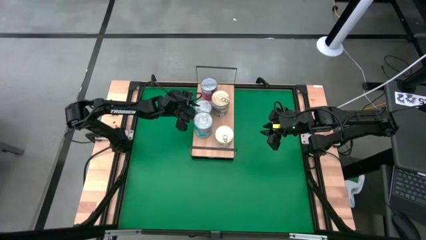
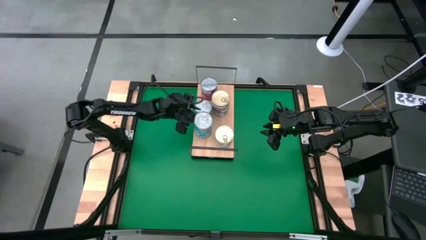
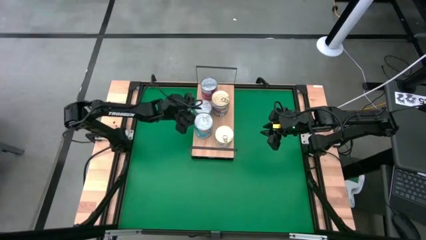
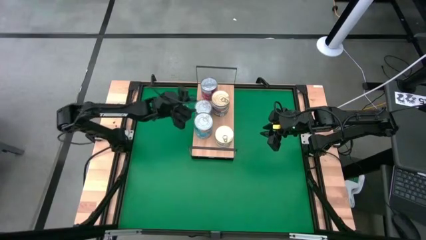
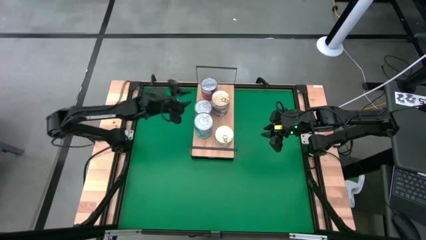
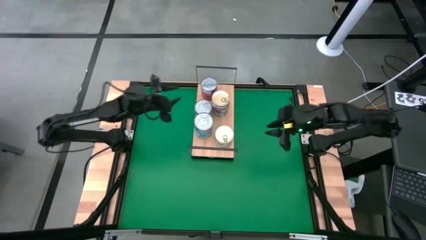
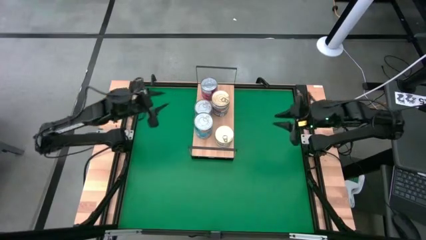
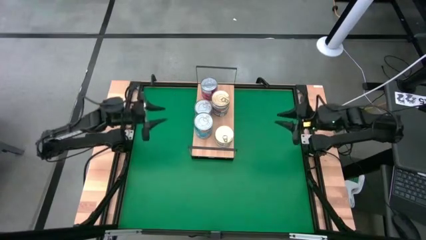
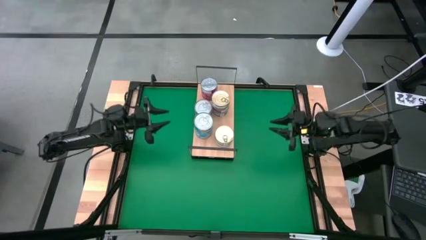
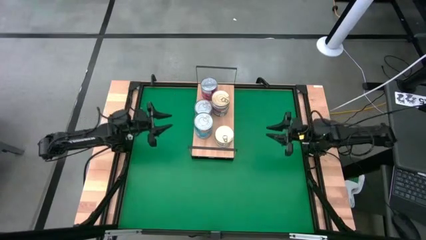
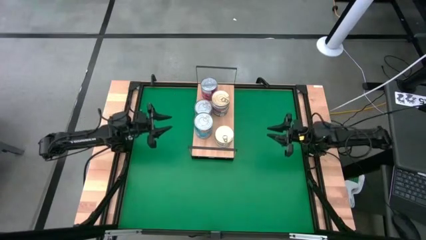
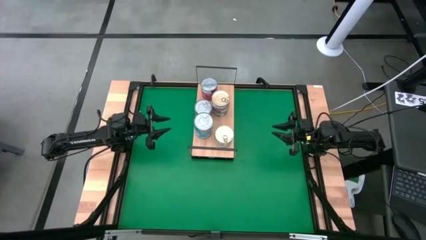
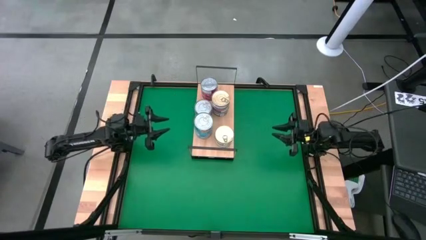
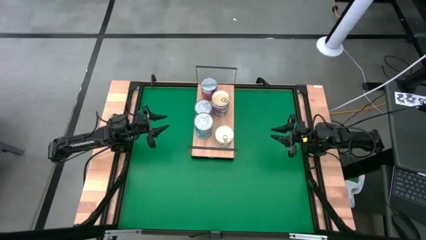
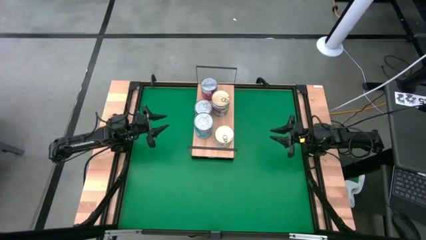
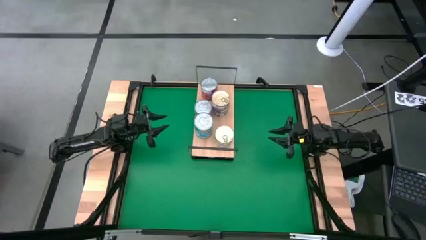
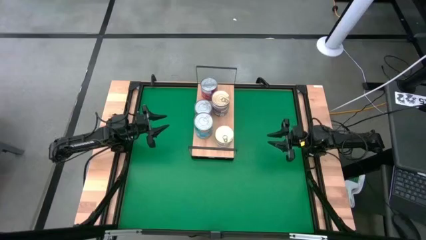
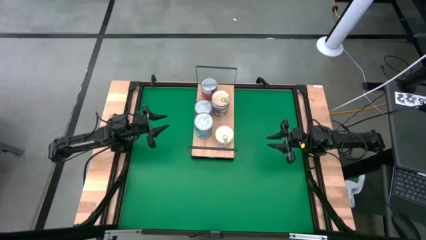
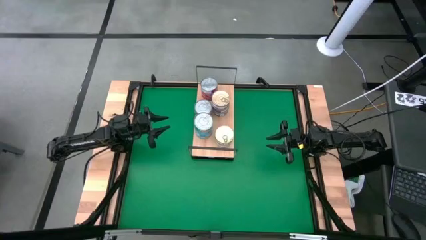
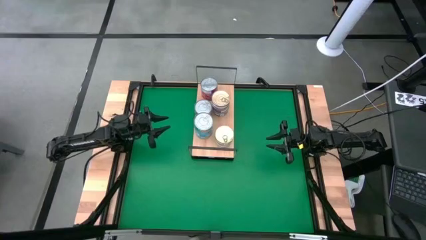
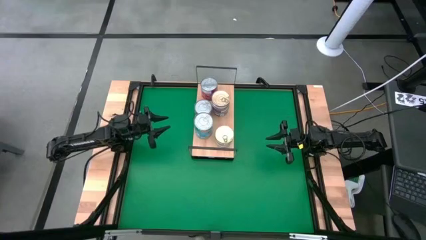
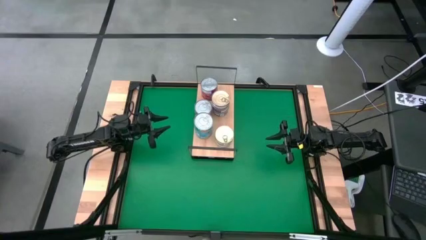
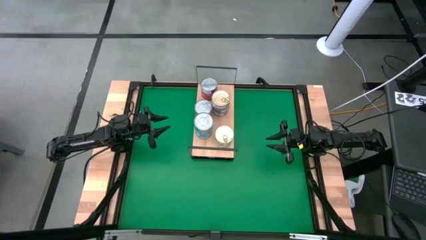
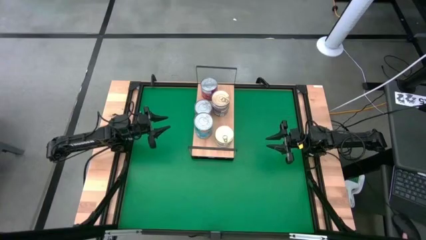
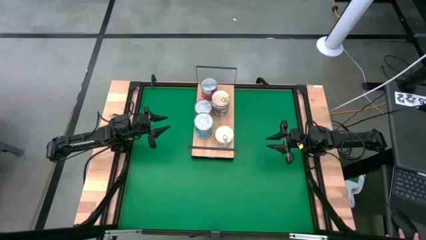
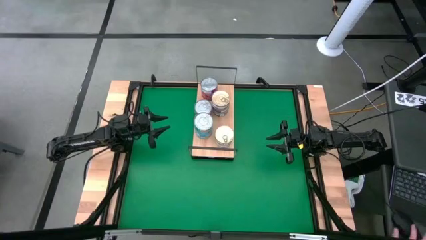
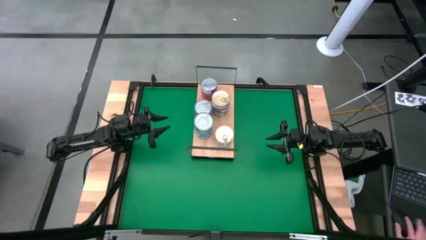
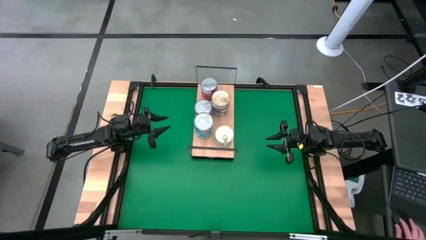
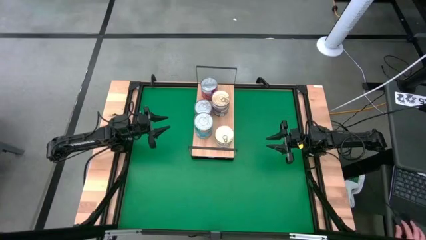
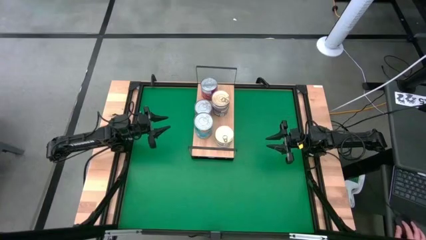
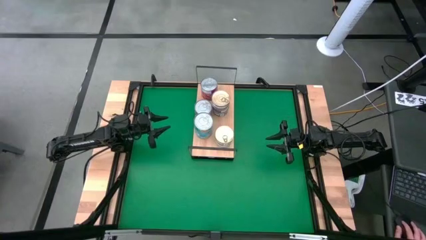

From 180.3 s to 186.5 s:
Task: Stack canned seafood by type on shelf
Return to Home Position

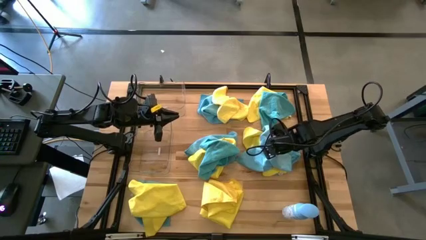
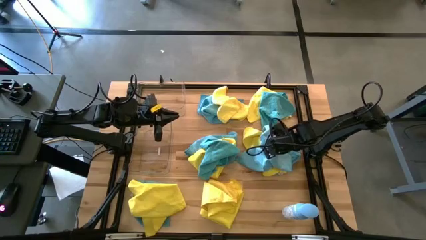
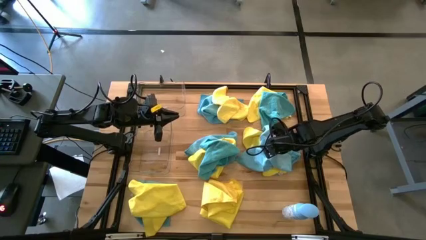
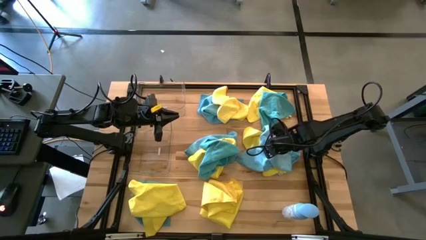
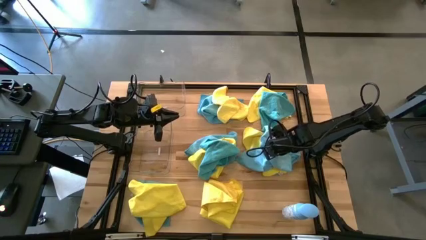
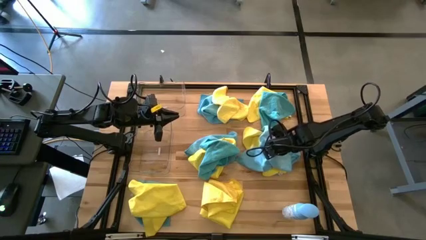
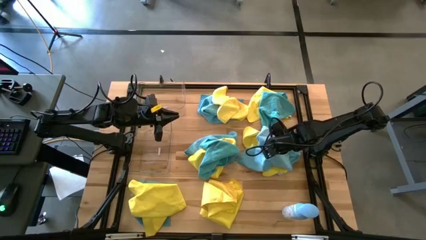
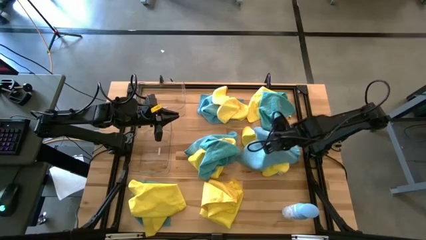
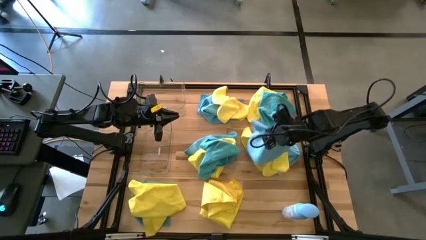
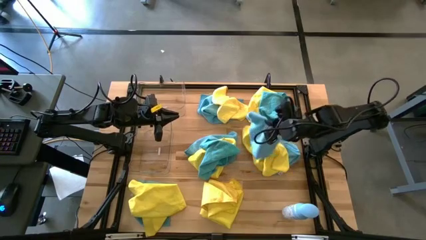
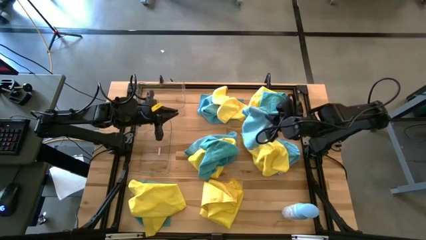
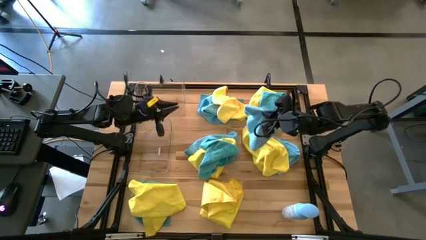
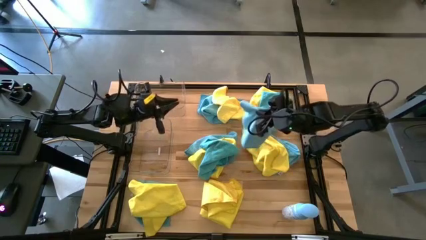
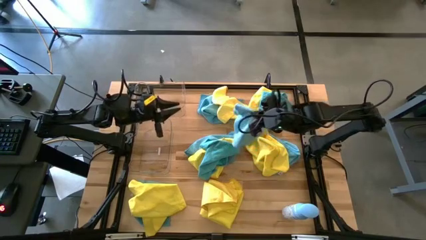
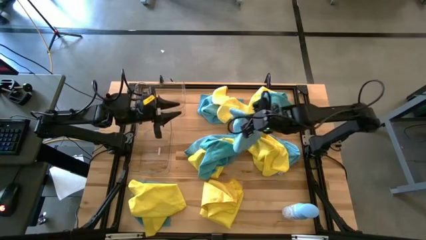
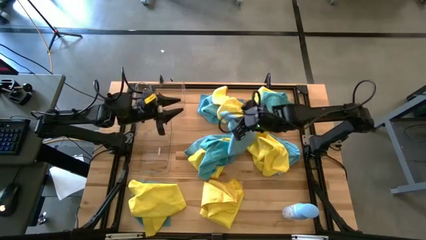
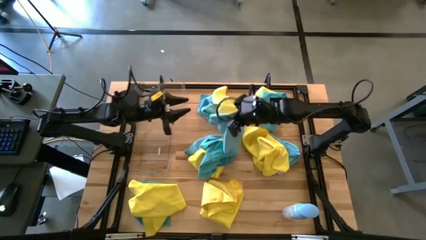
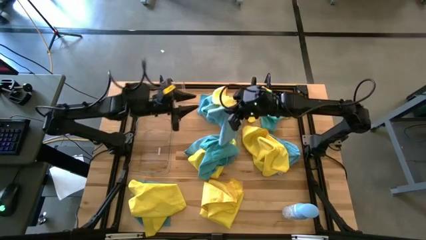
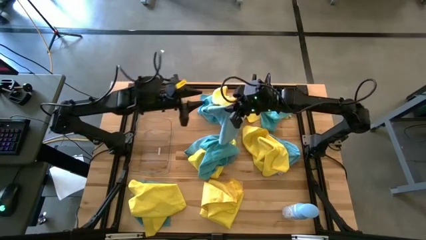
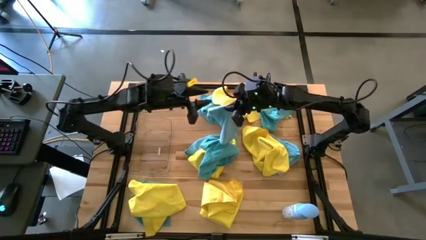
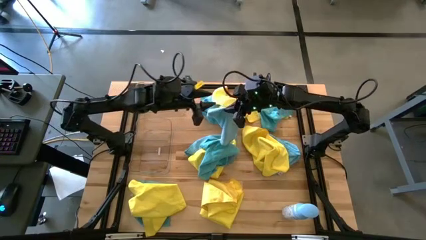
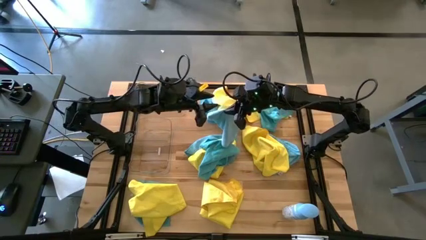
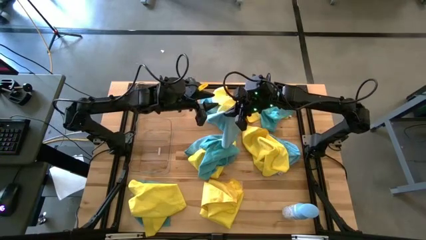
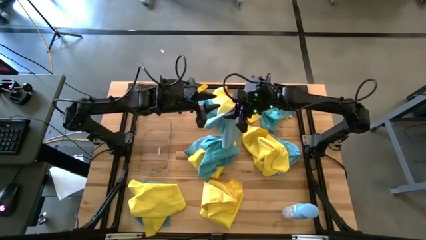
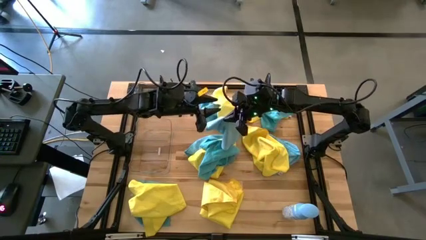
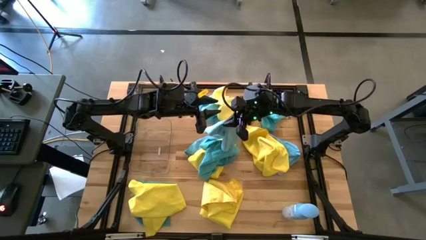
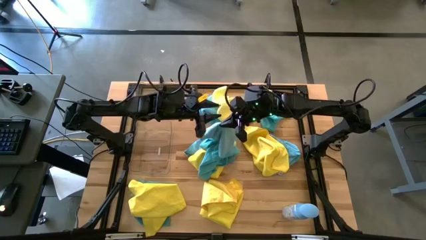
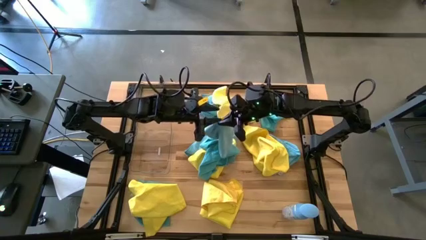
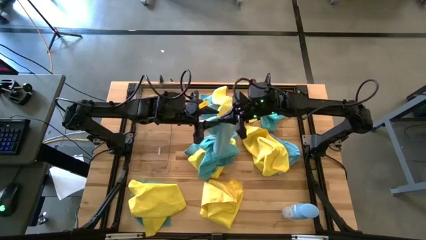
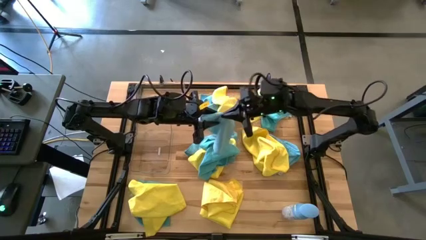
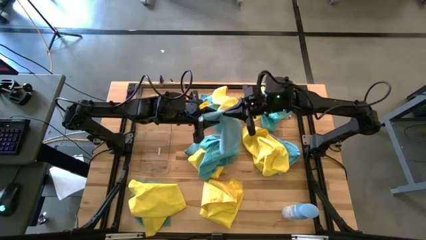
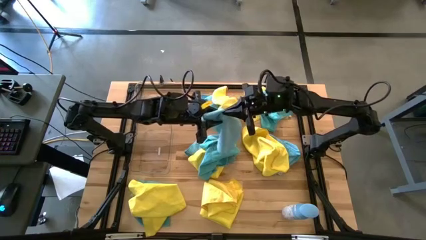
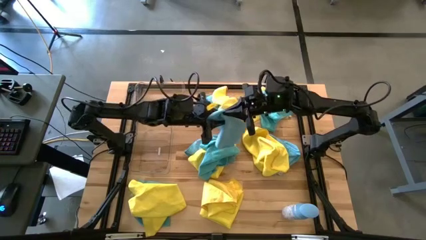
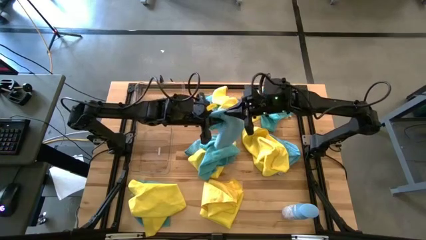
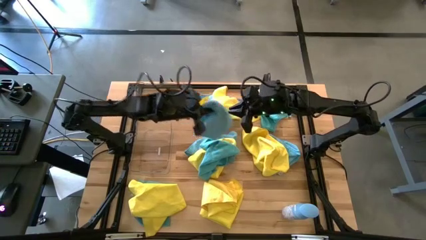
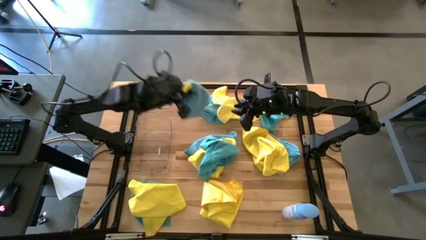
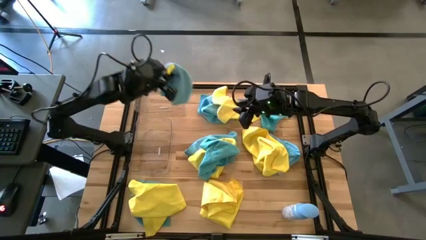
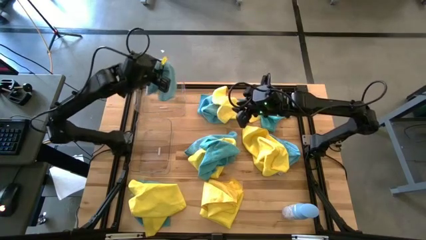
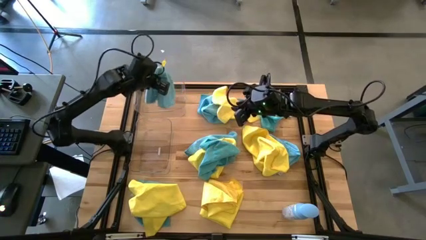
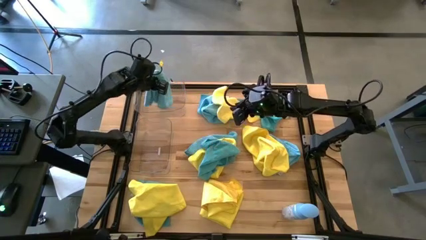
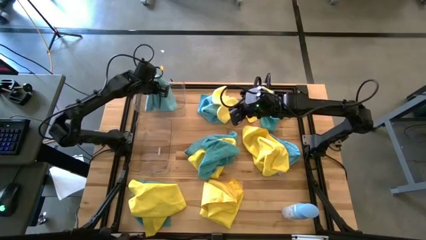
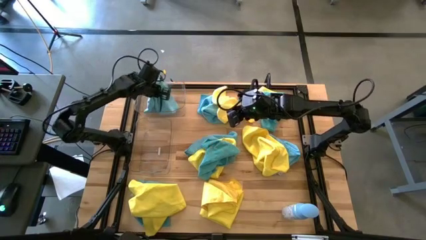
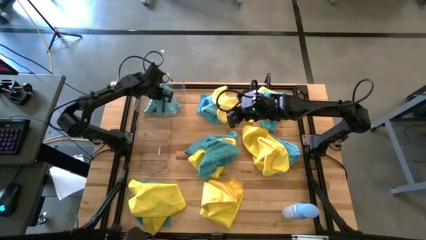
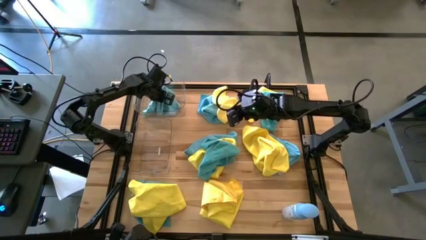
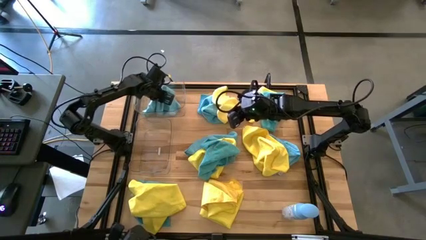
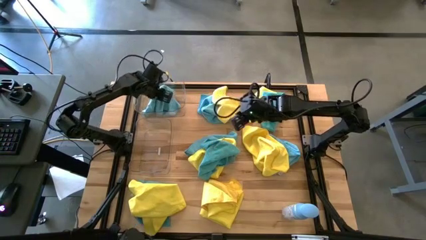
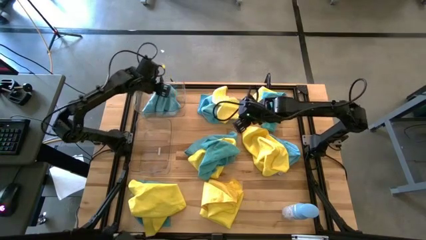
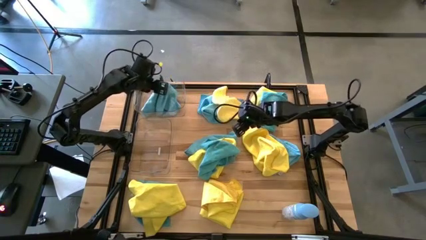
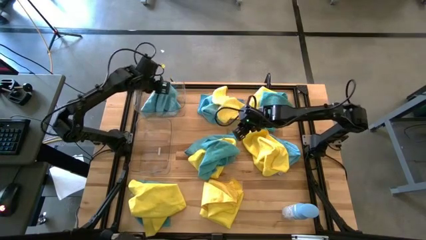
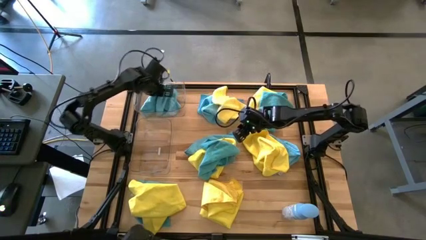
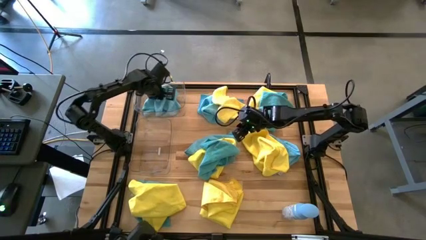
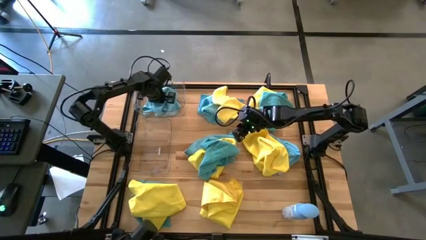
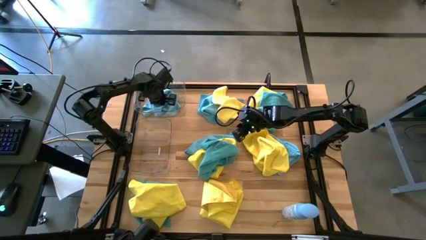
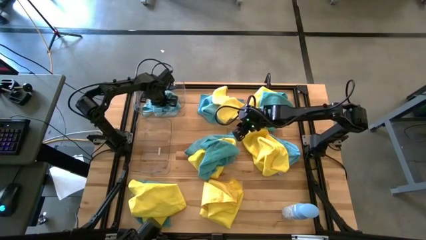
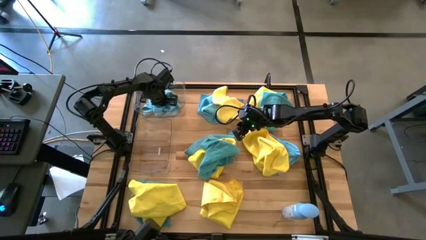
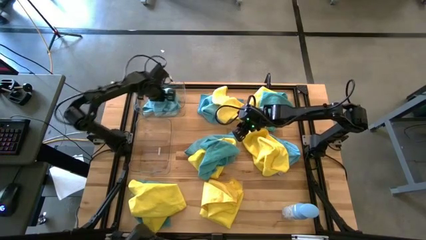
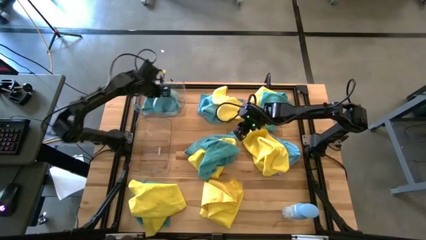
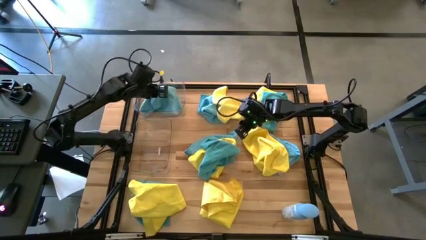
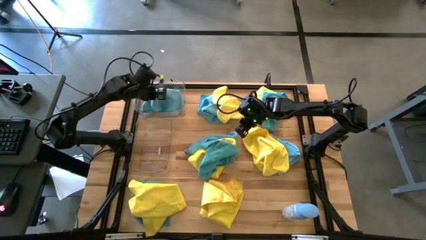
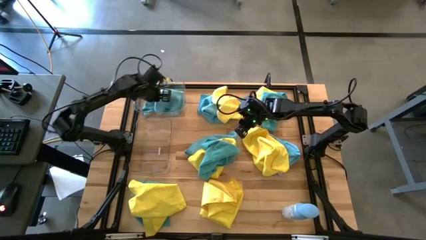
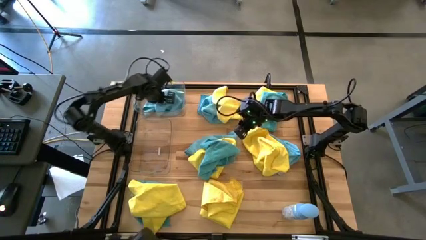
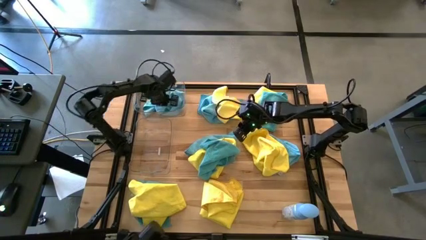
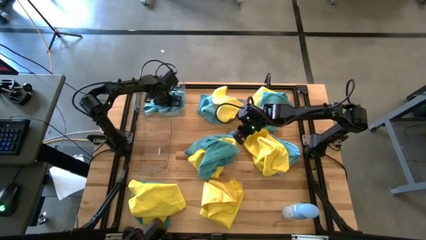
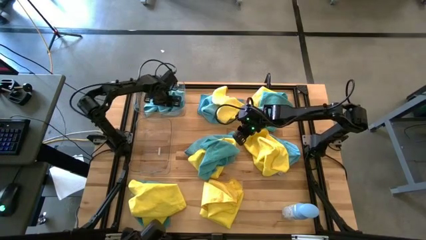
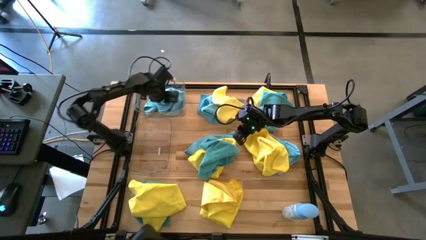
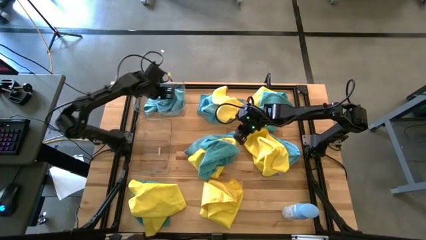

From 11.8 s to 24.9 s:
Task: Sort microfiber towel by color & place in baskets
Put the blue microfiber cloth into the top transparent bin
